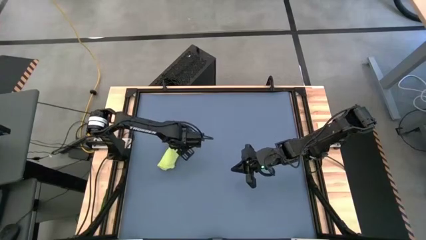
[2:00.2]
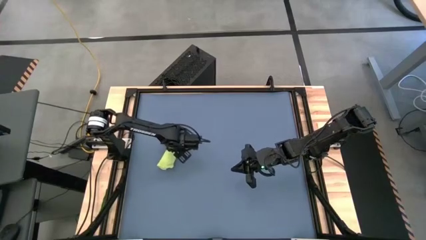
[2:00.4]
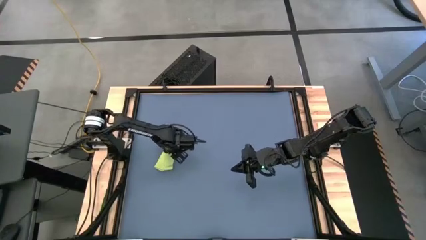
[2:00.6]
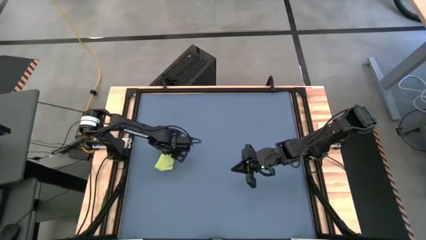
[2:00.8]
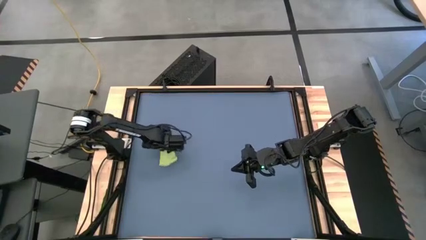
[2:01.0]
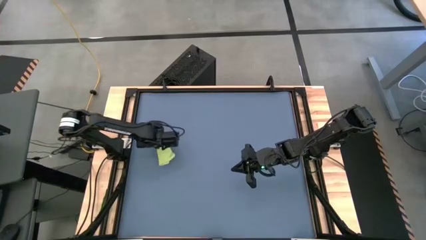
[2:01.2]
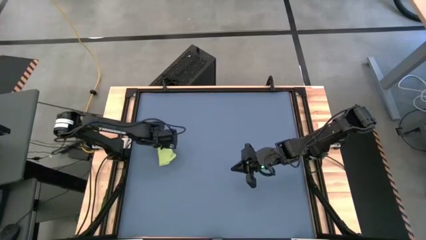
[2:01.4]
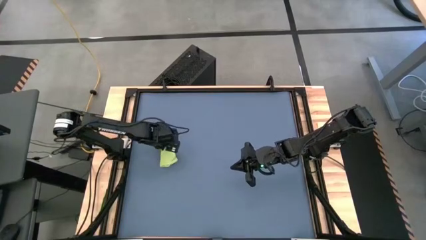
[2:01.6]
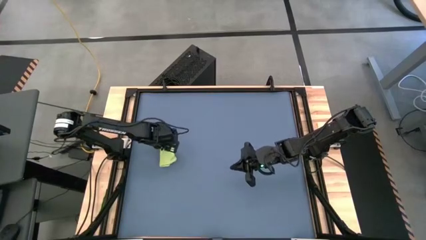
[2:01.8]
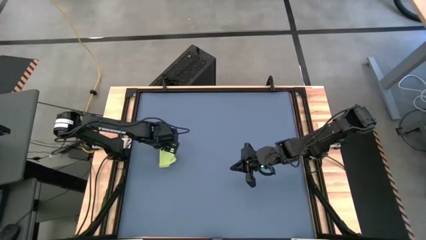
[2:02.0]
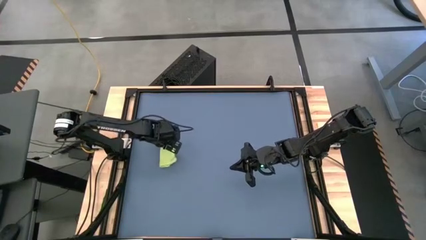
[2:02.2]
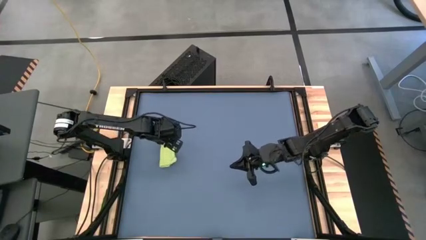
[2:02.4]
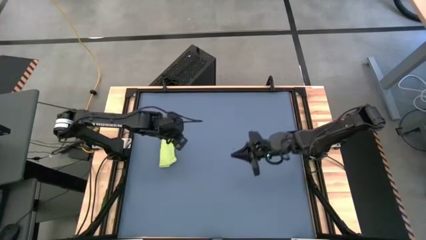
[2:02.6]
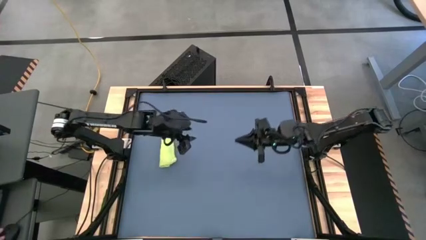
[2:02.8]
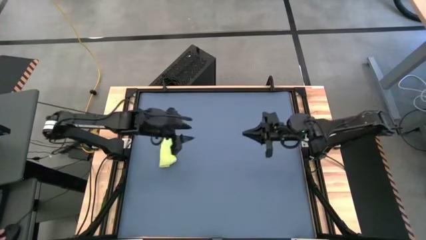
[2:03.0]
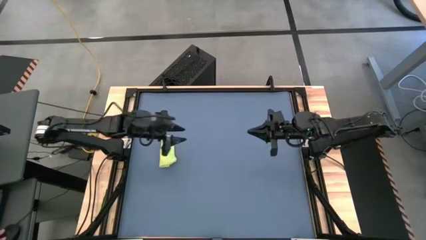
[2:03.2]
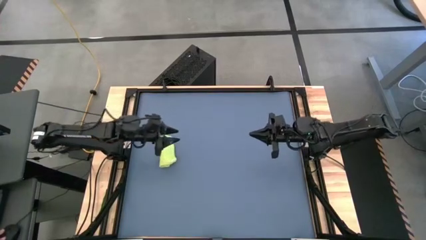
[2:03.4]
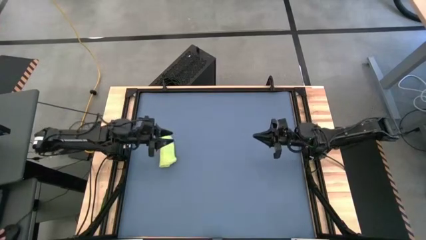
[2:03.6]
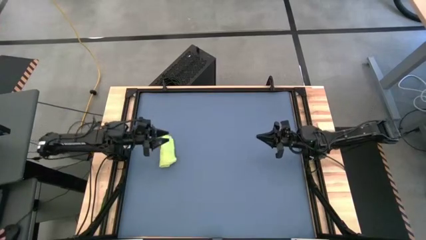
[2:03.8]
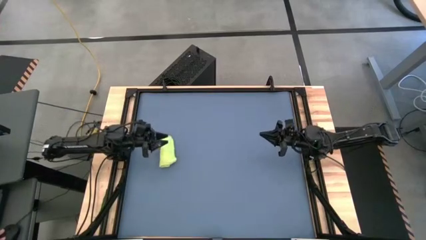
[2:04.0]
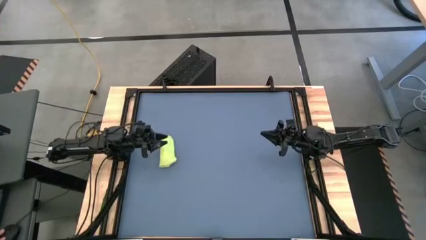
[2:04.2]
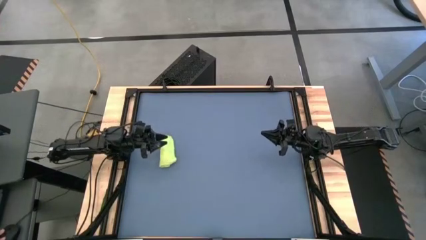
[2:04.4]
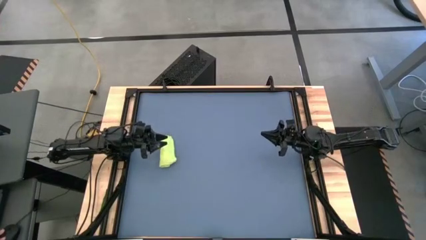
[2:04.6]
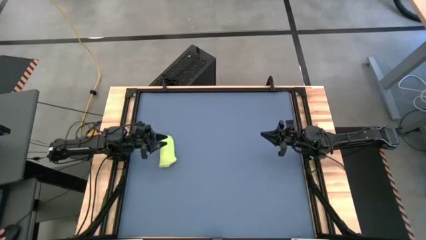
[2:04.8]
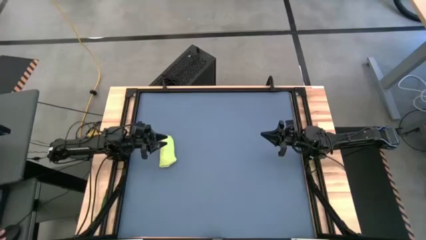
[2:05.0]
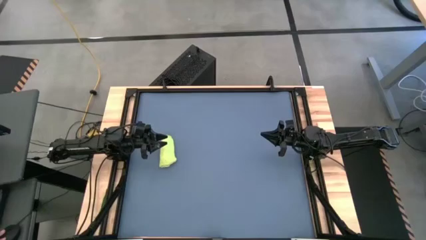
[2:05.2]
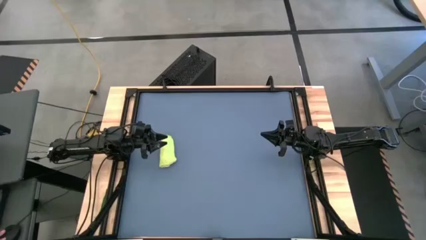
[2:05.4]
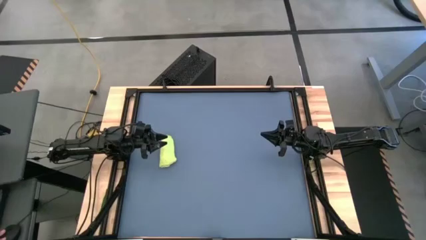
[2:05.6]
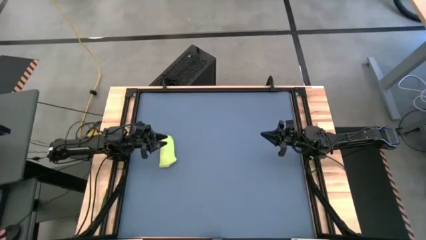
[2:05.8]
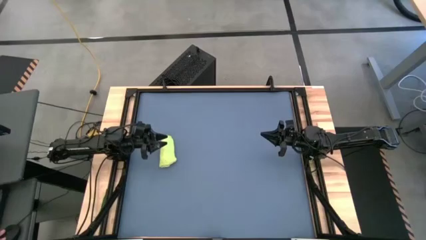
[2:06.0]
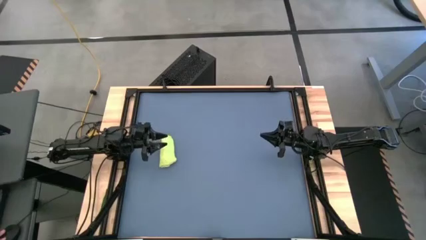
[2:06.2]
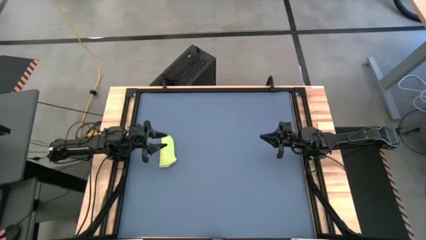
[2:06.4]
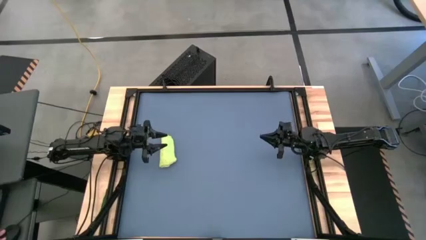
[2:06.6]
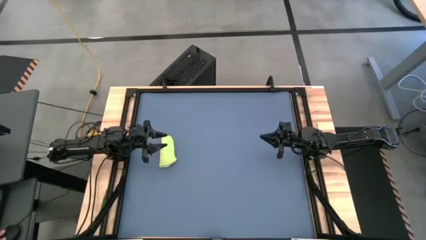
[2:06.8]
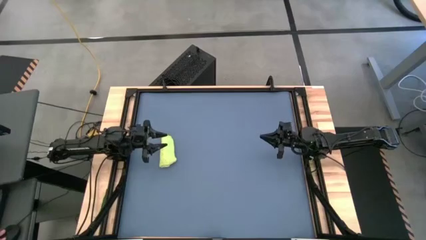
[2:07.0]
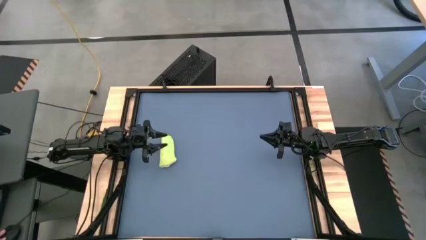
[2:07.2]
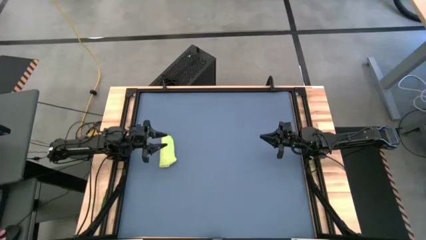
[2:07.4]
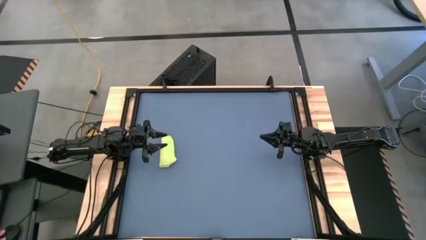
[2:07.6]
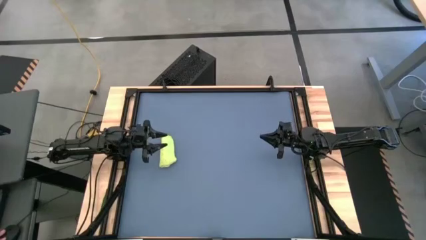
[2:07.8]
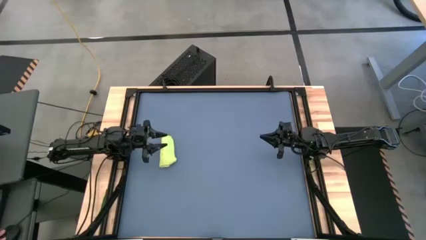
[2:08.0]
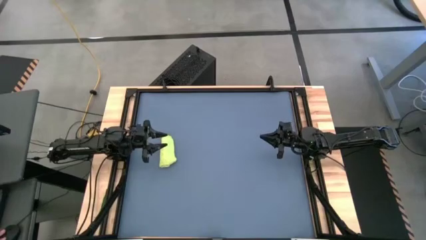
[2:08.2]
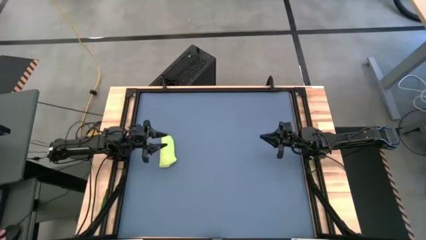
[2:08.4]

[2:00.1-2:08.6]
Task: Roll towel
Return to Home Position

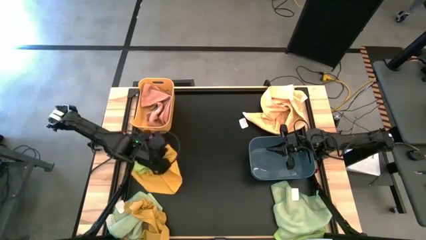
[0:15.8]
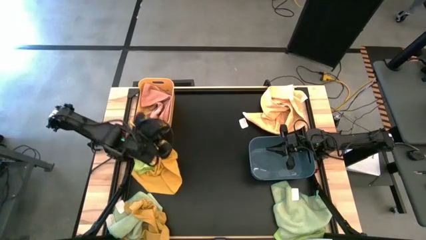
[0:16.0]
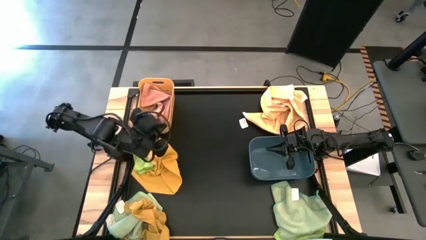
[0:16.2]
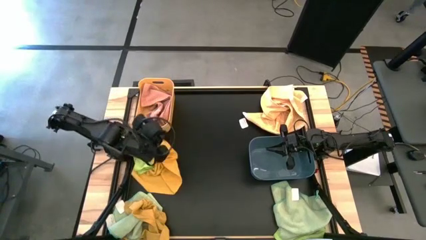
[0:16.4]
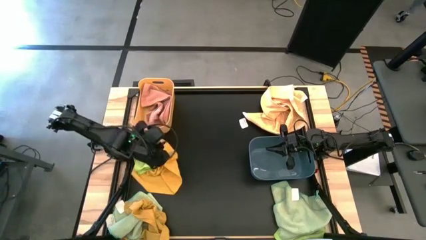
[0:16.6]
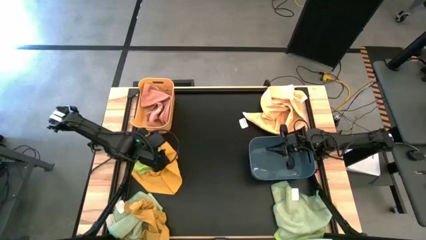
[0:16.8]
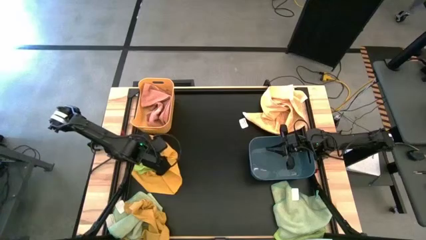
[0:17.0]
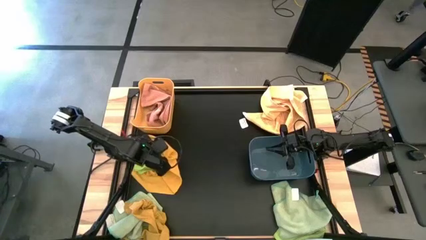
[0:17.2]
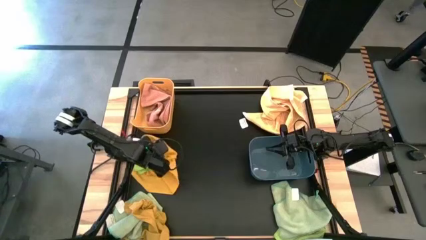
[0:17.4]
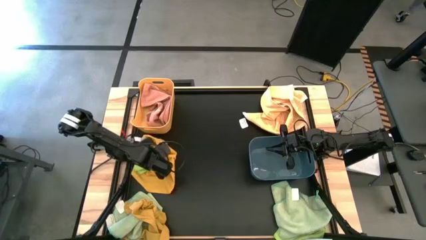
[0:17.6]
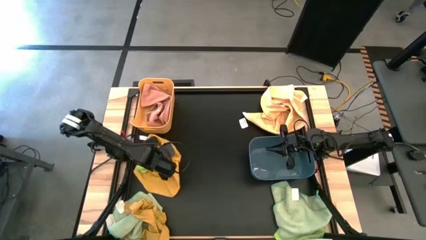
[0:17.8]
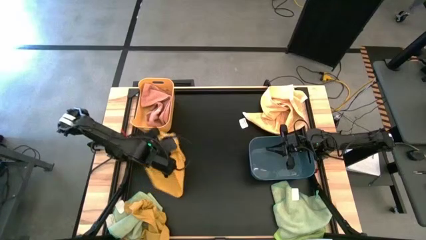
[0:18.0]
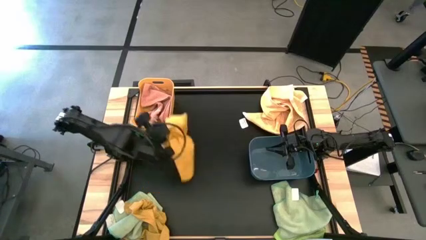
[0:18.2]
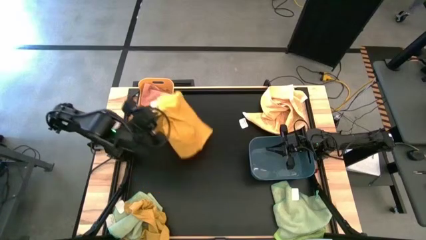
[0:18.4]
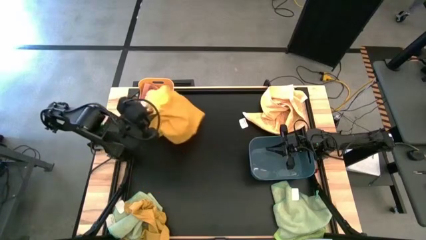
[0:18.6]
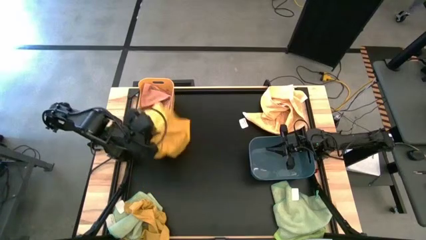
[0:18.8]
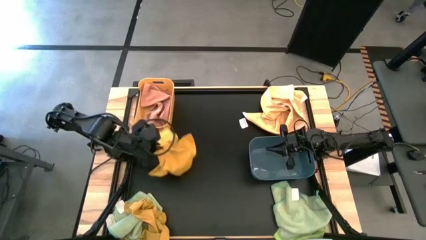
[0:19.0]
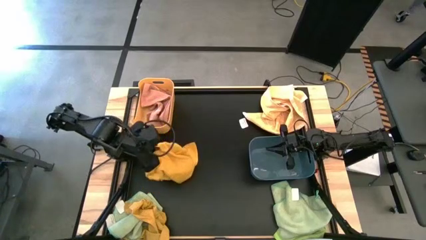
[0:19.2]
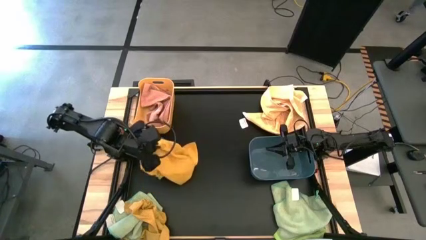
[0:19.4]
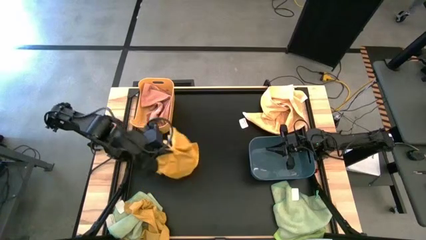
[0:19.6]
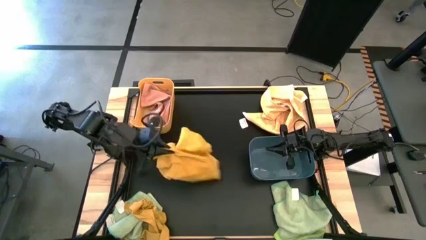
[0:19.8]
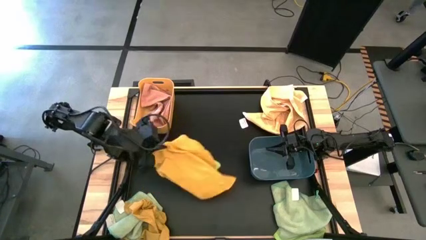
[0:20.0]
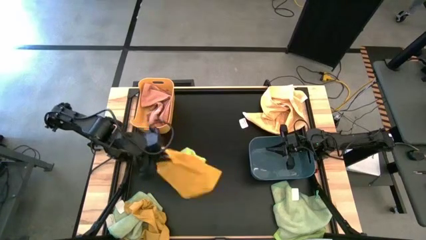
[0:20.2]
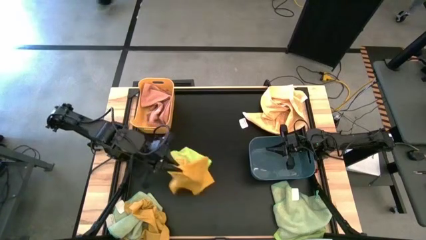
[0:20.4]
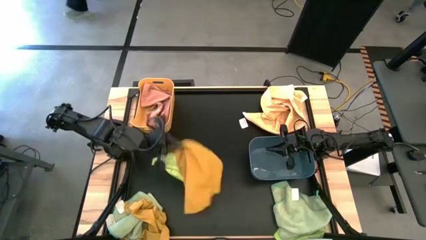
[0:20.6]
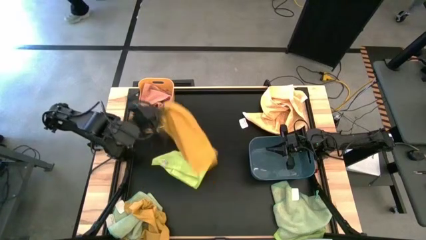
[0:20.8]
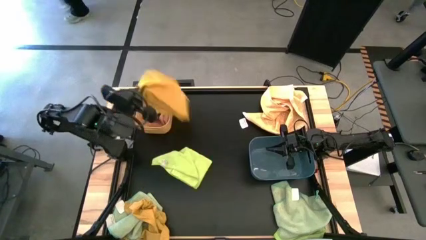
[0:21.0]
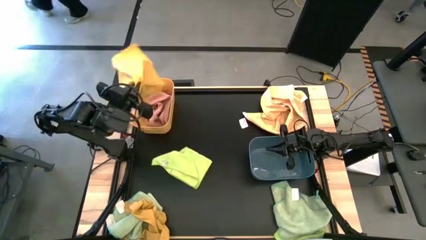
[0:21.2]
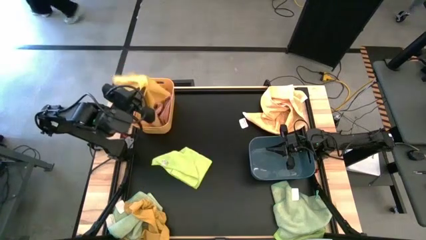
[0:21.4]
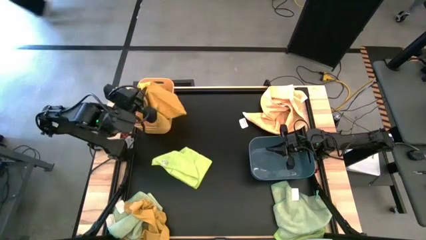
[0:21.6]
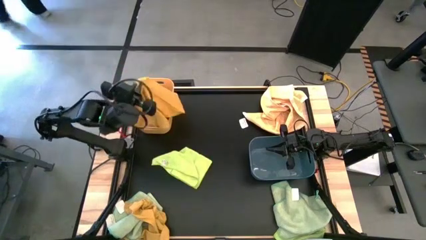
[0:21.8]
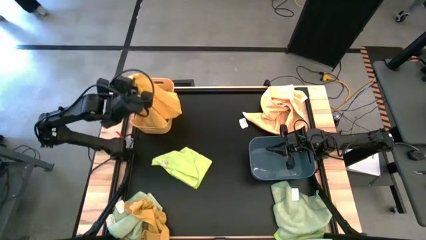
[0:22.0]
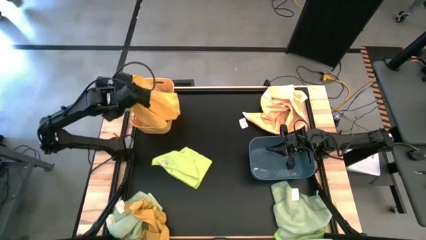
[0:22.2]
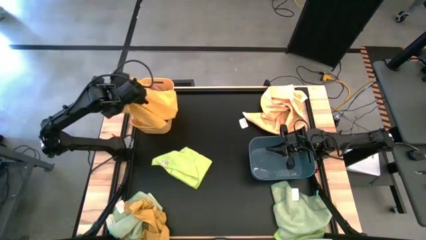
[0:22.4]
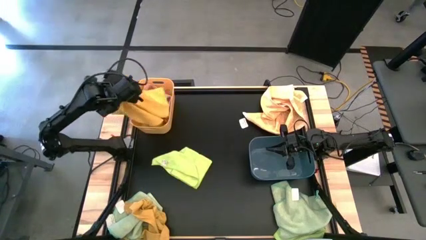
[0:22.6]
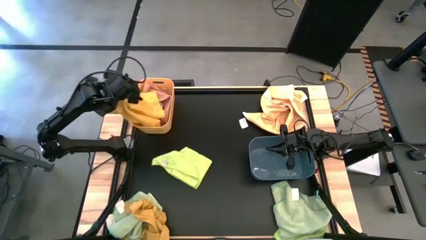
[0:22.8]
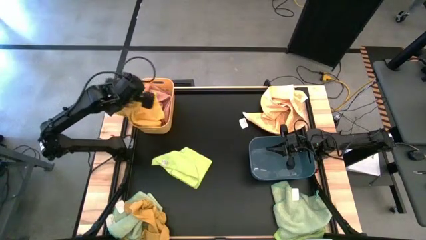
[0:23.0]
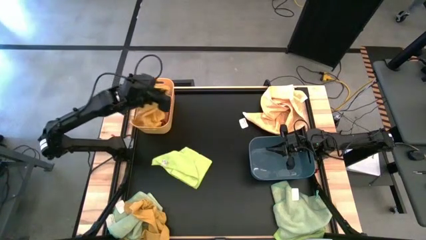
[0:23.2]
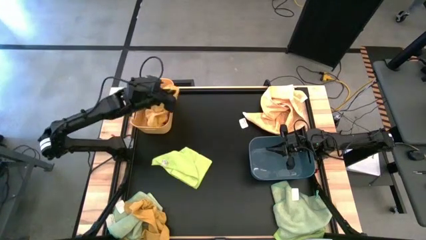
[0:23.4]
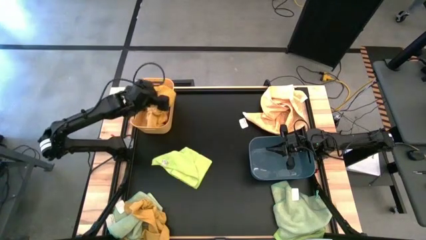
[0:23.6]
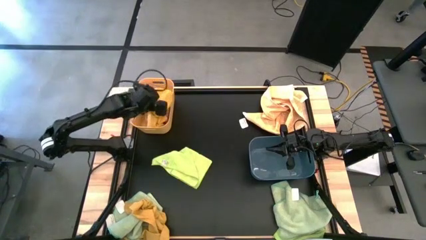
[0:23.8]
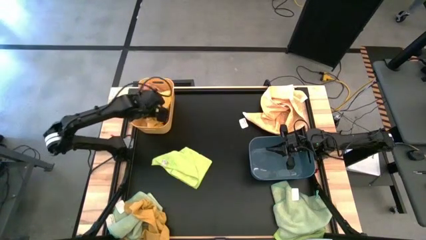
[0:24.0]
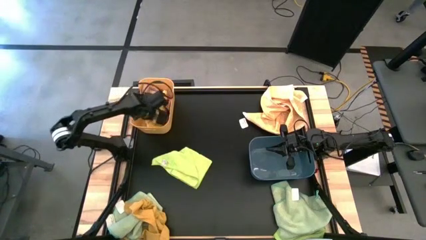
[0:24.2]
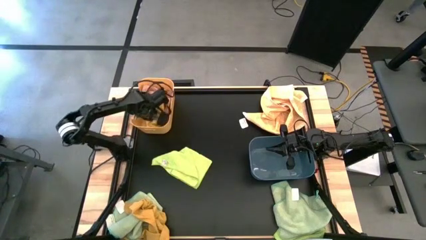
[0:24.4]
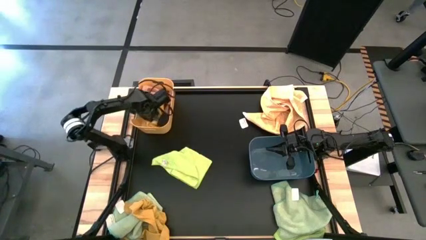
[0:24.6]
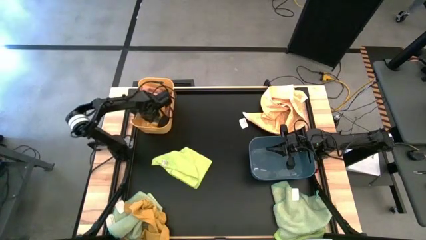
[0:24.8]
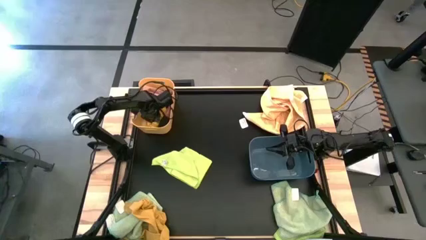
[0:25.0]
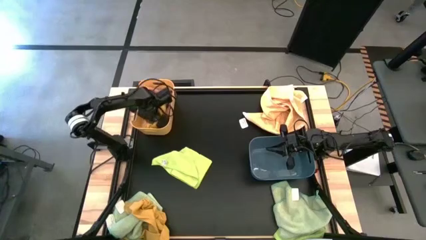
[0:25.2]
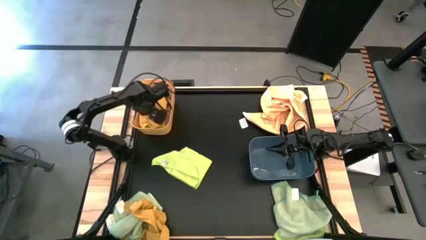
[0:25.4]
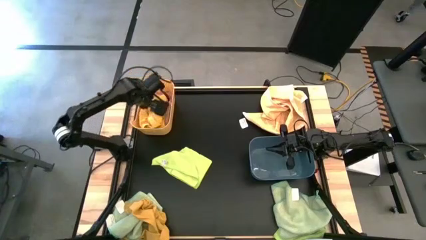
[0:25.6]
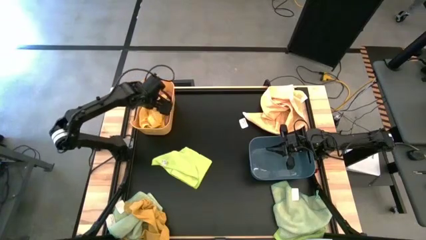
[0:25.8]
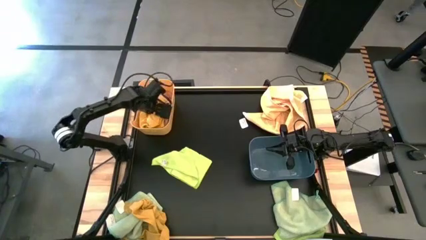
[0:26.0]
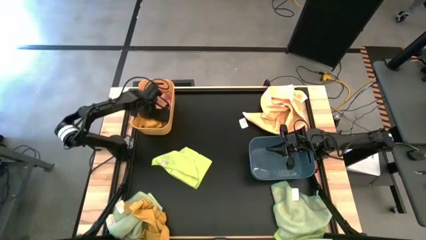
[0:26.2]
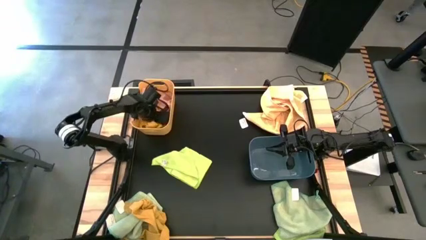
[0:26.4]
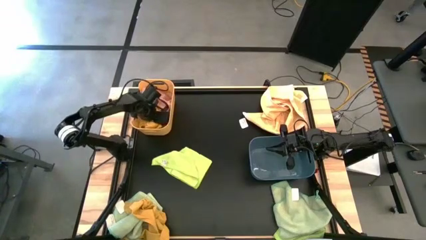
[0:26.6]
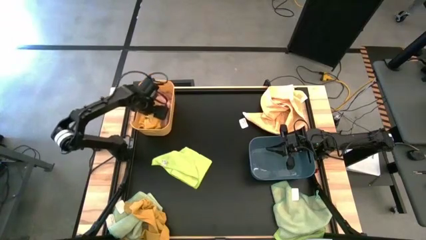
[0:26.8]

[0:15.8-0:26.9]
Task: Sort towels by color in basket
Put the top yellow microfiber cloth into the yellow bin
